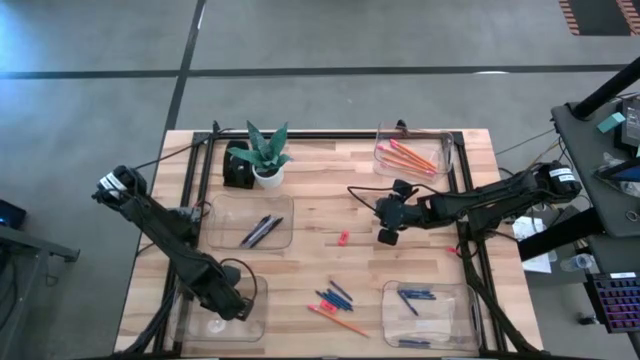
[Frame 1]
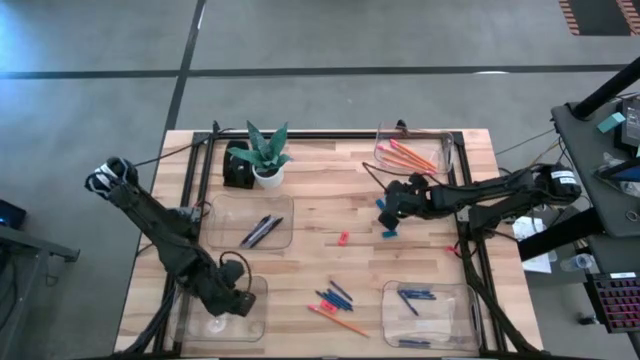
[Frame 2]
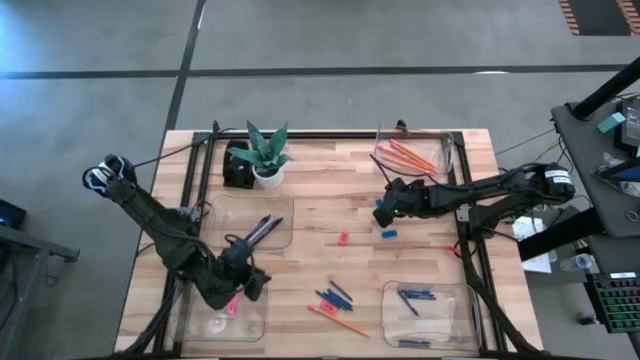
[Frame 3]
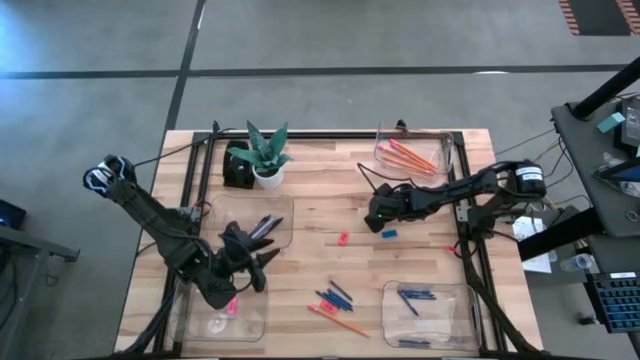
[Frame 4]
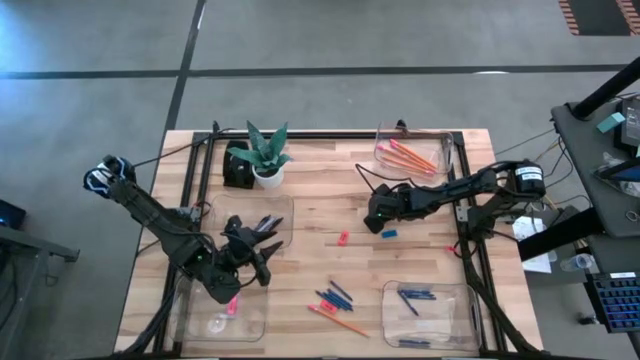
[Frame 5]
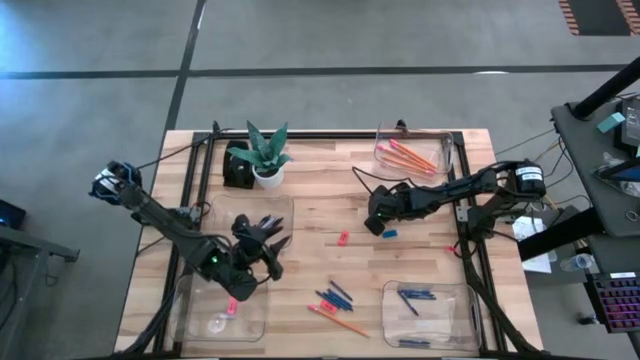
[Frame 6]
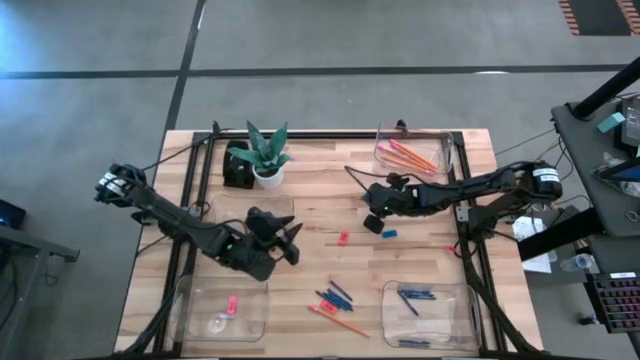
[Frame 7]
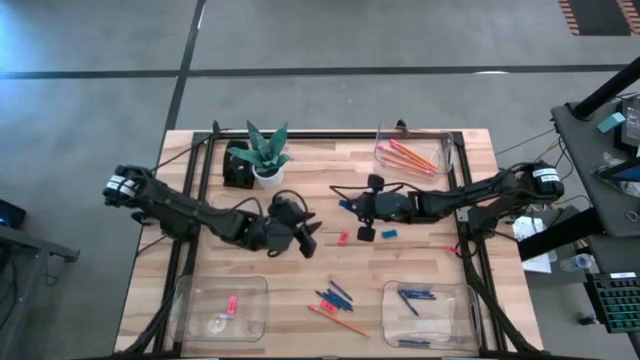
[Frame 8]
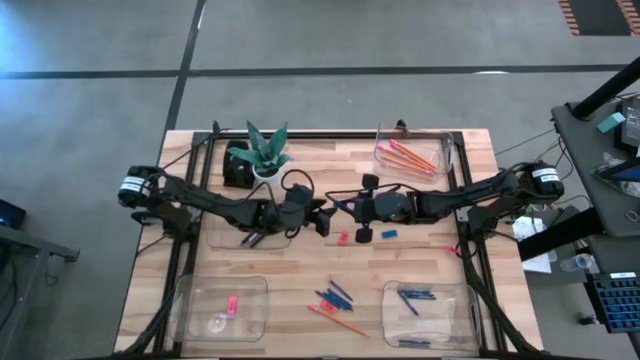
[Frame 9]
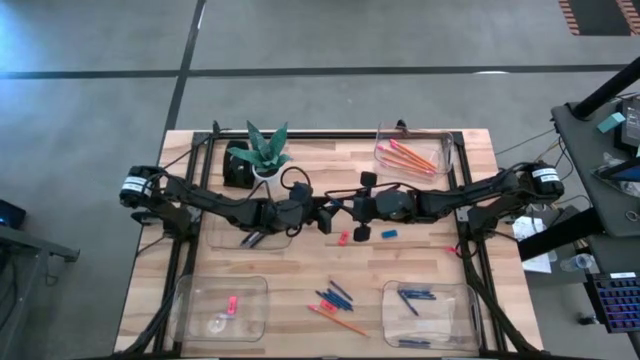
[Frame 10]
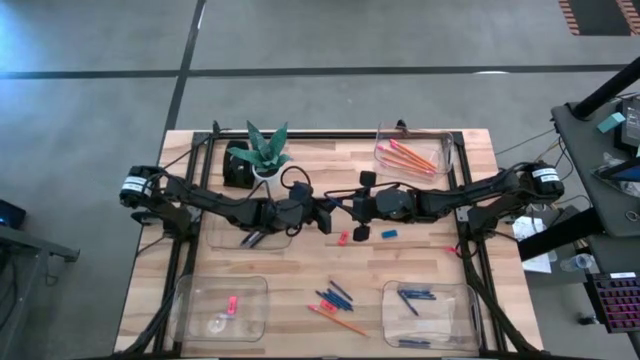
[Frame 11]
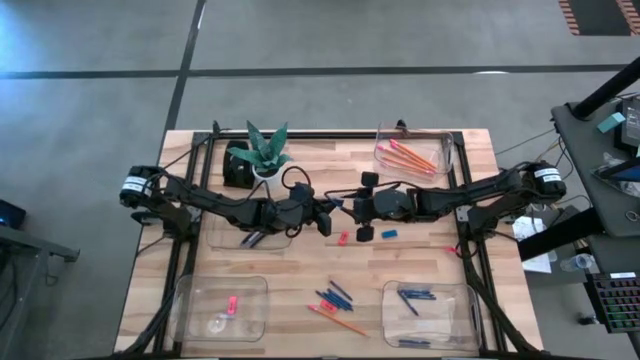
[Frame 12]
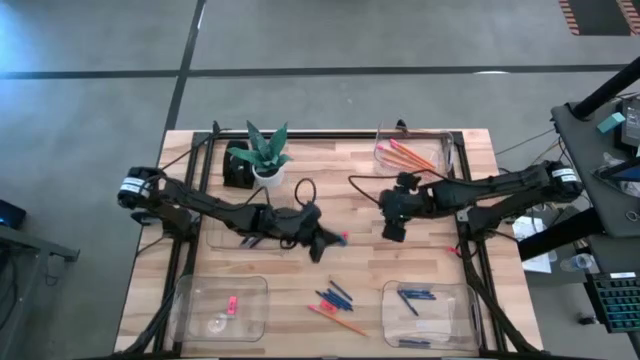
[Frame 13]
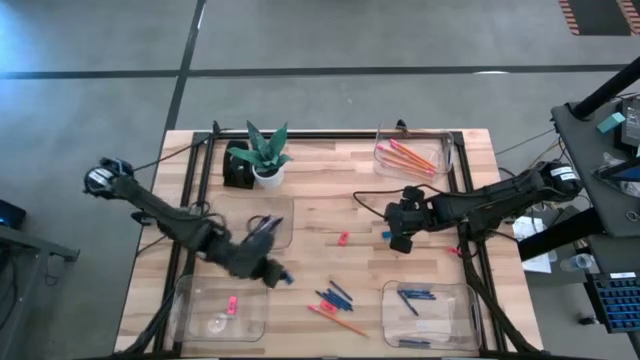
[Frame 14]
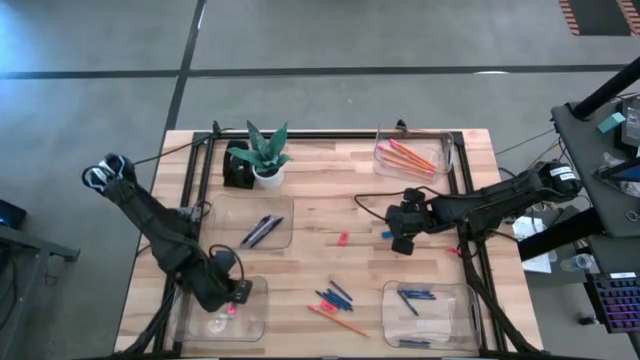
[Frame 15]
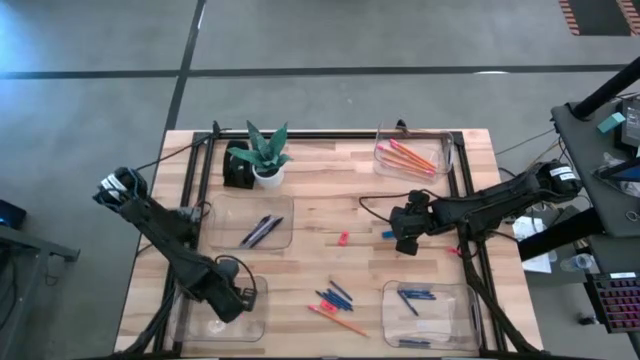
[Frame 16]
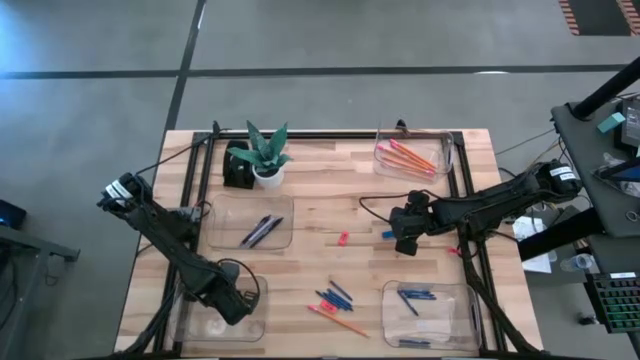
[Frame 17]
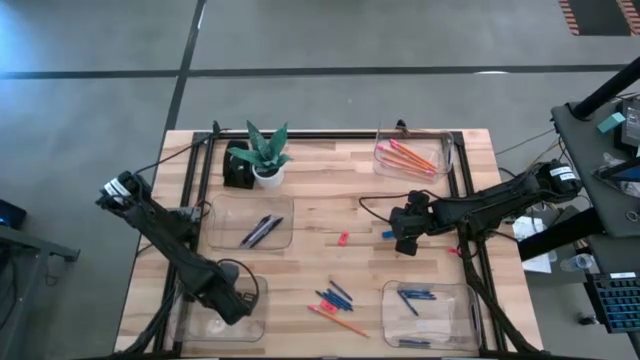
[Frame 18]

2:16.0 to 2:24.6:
Task: Sort crayons/erasers/pens/pencils in bins
Put the blue eraser into the bottom left transparent bin

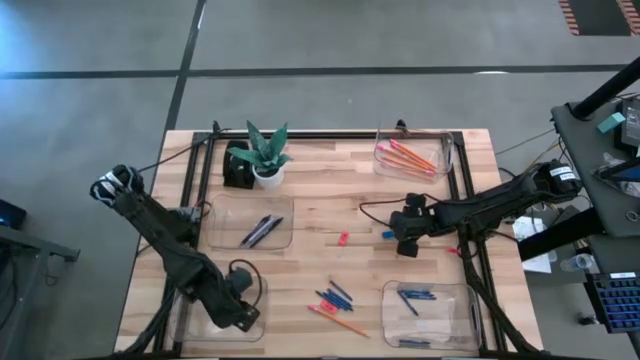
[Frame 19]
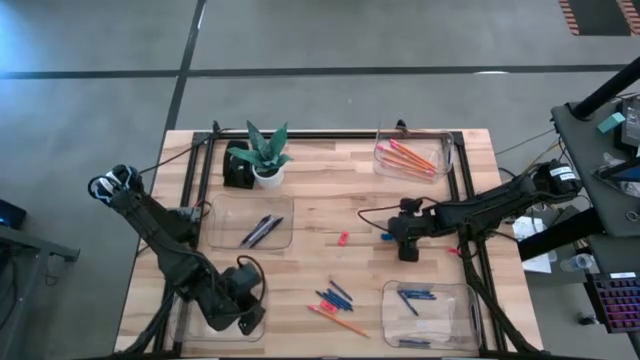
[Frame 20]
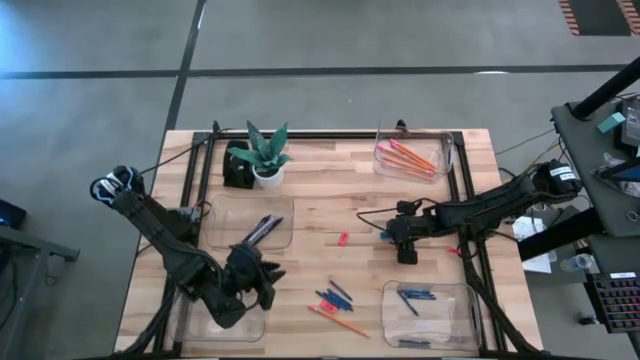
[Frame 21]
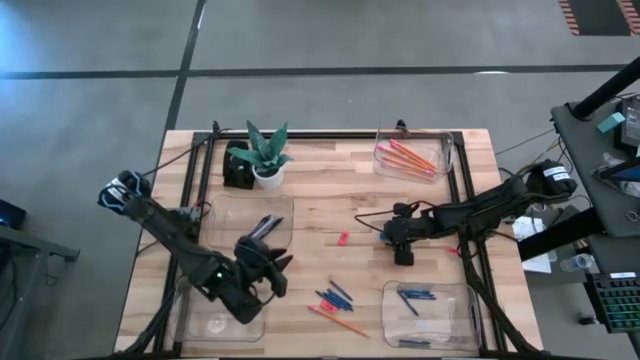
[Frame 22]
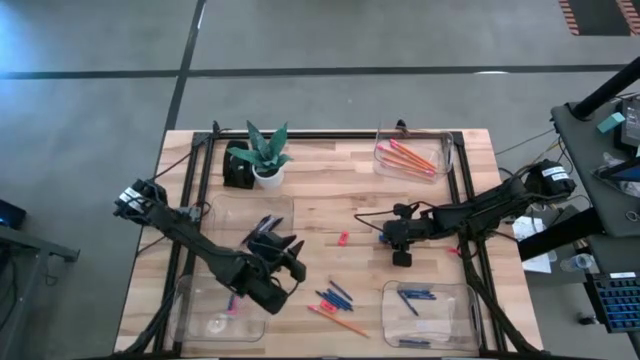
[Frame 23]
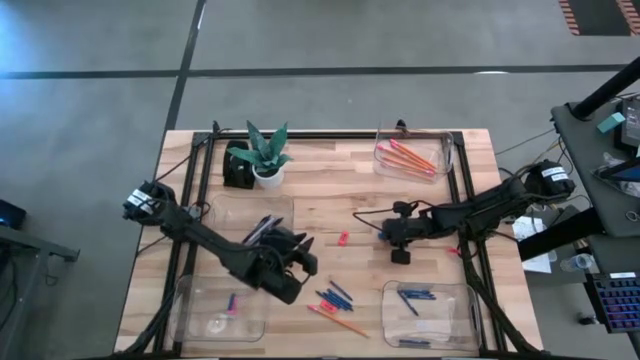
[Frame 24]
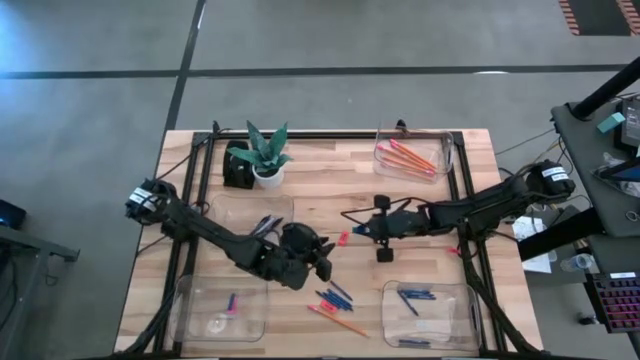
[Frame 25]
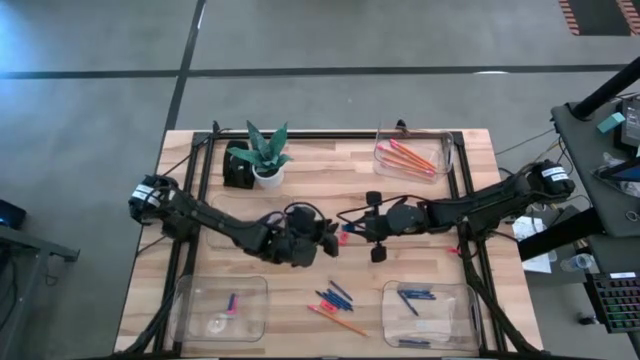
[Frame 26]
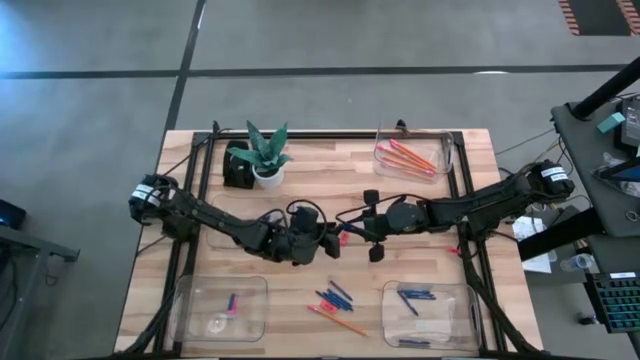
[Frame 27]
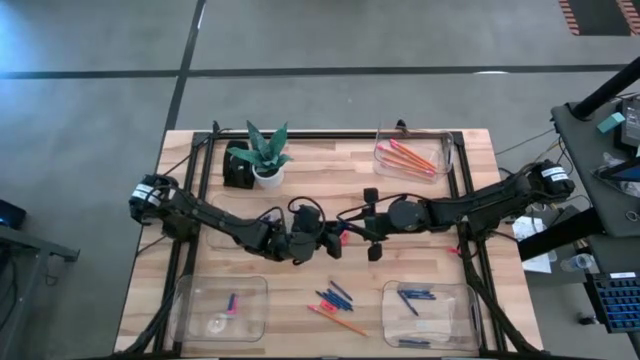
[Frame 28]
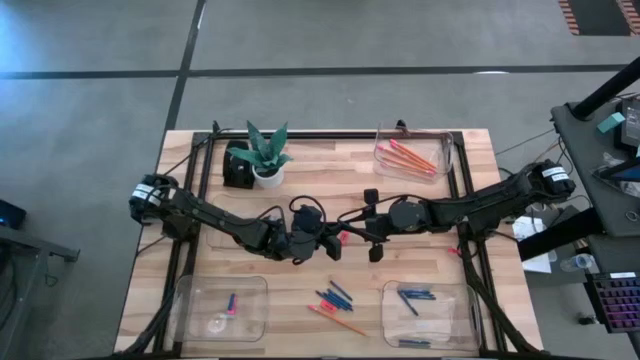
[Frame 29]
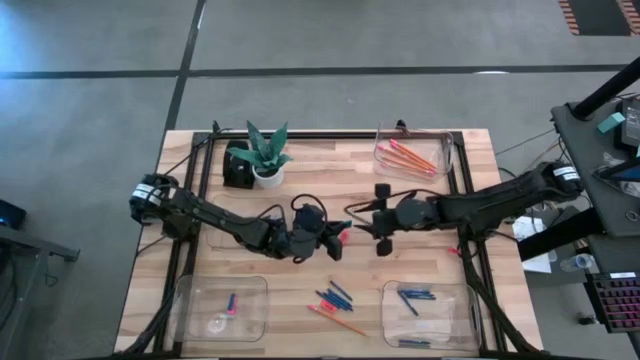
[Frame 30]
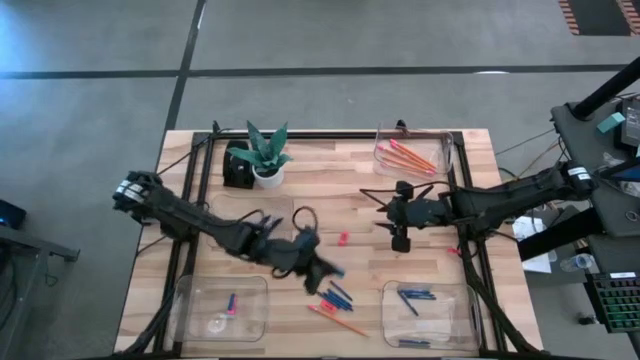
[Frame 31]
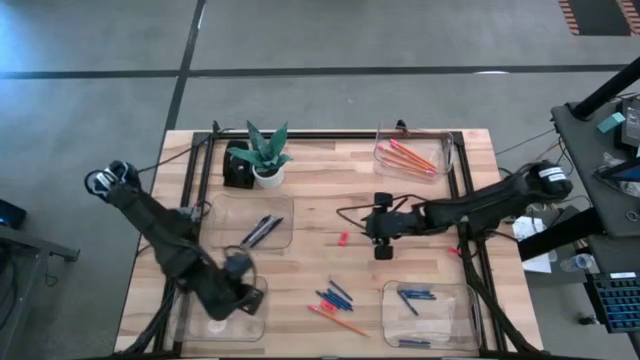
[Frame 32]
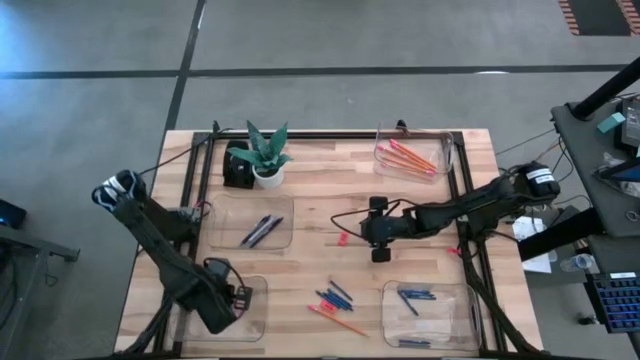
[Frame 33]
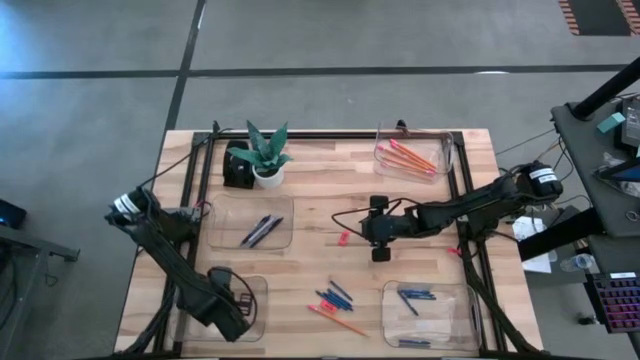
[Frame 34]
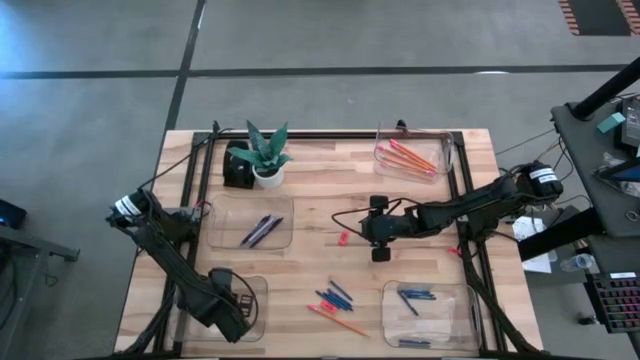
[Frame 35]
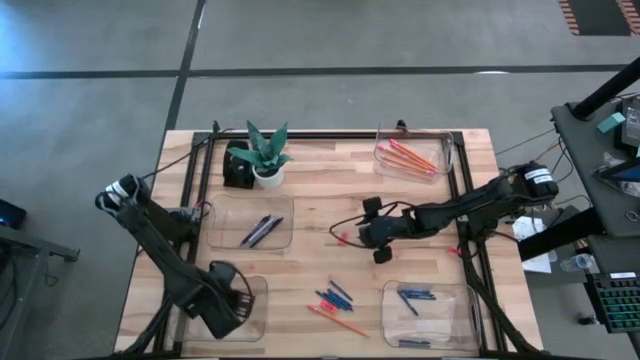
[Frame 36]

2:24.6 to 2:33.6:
Put the blue eraser into the bottom left transparent bin
